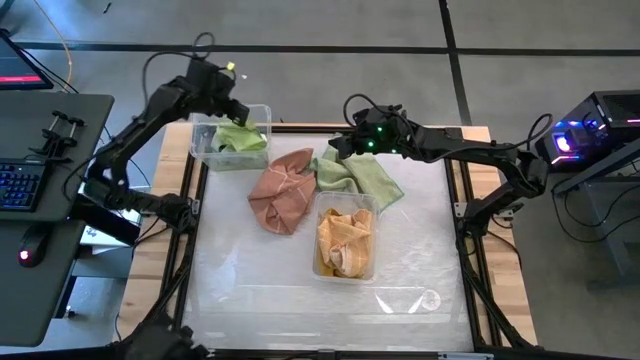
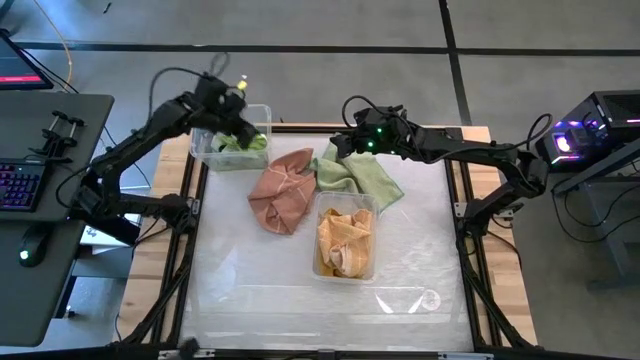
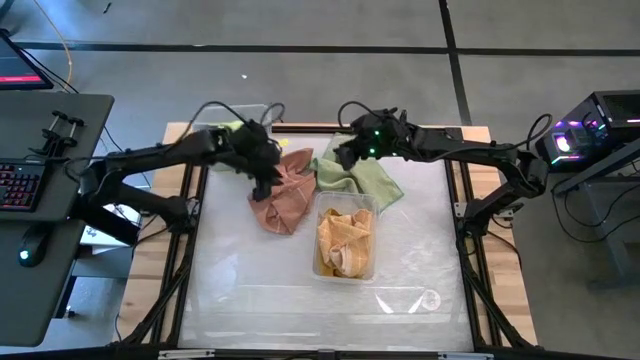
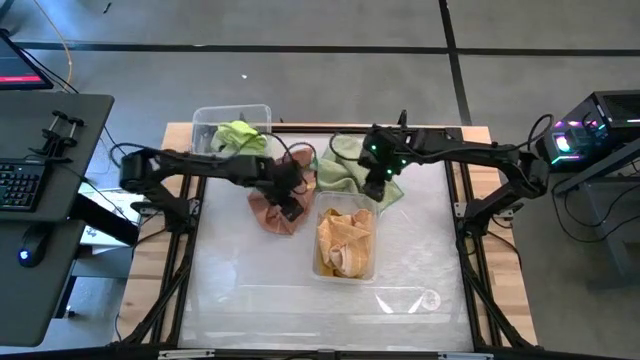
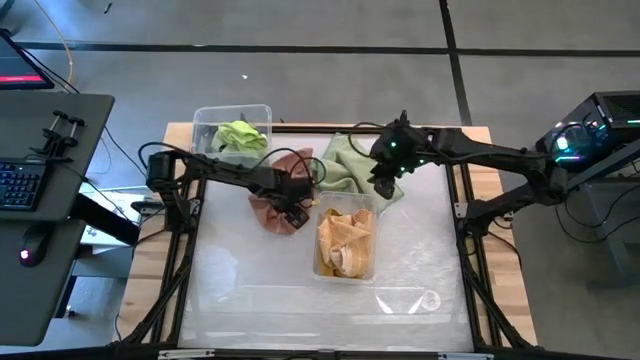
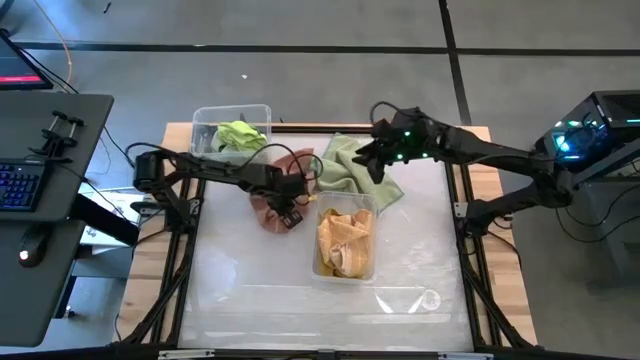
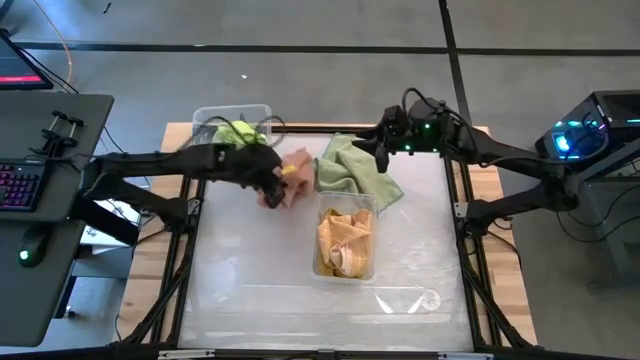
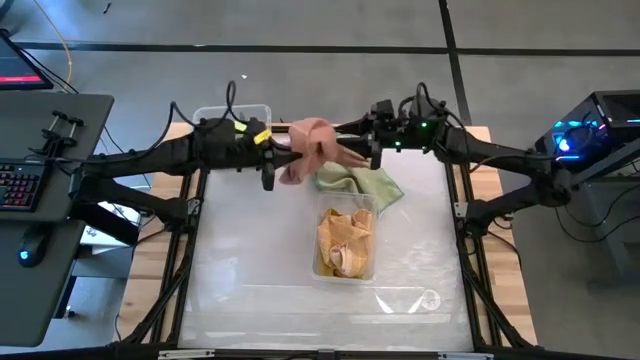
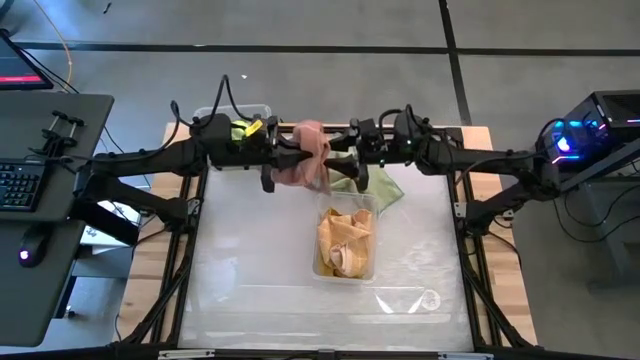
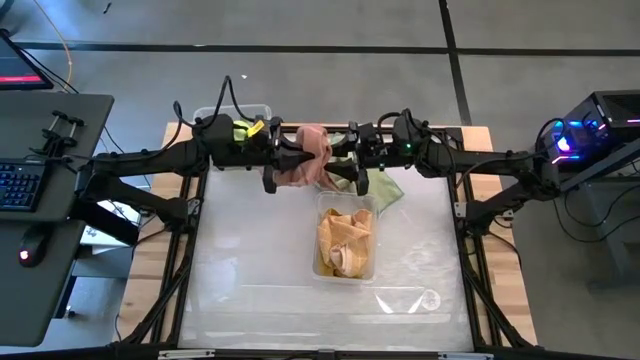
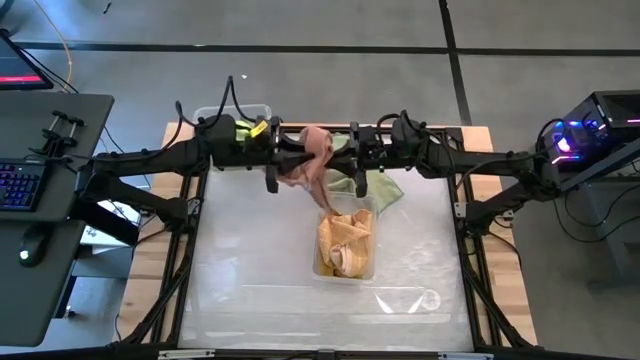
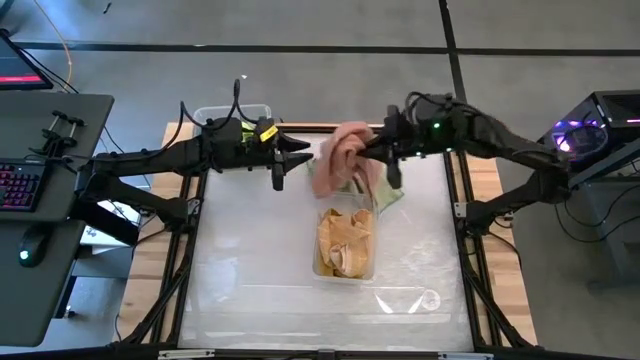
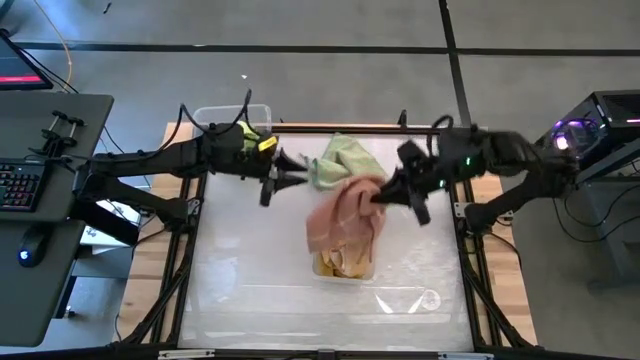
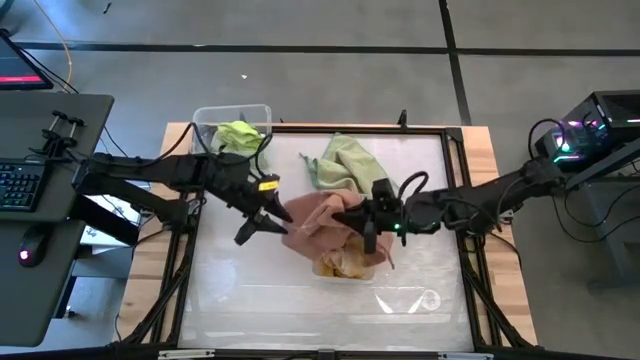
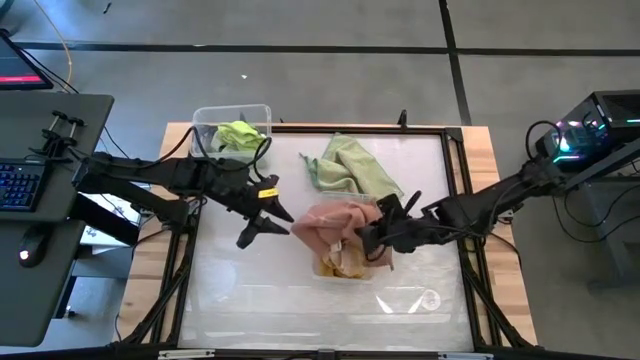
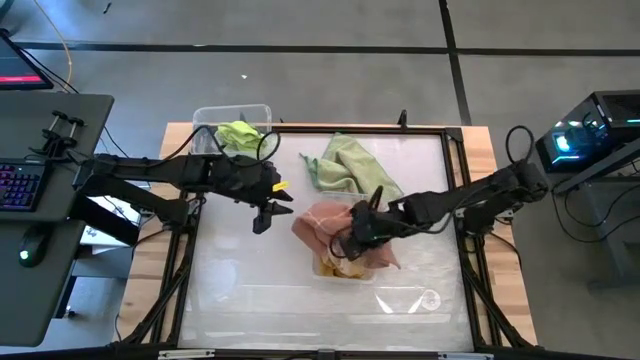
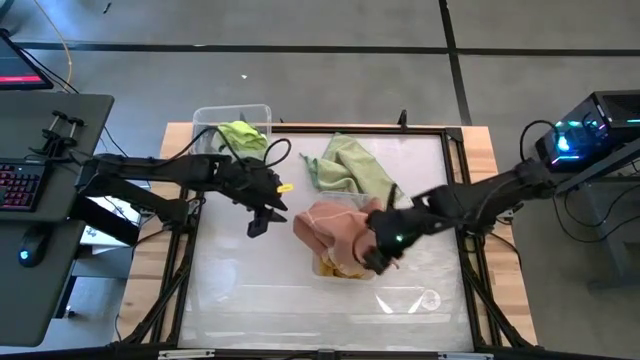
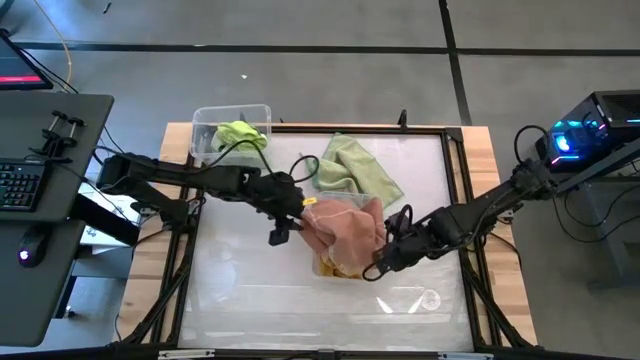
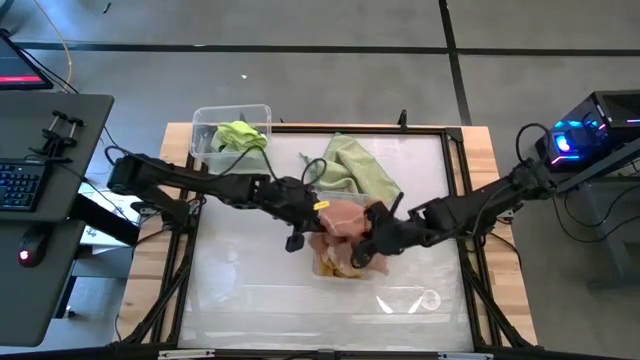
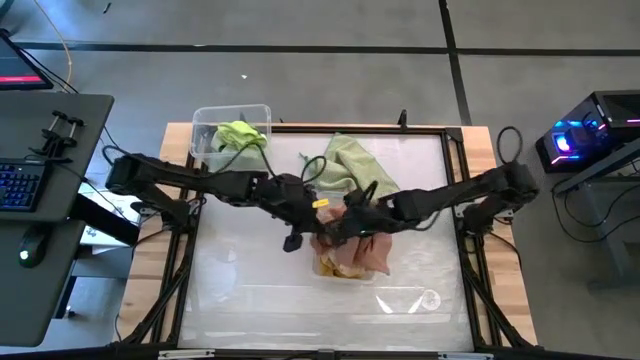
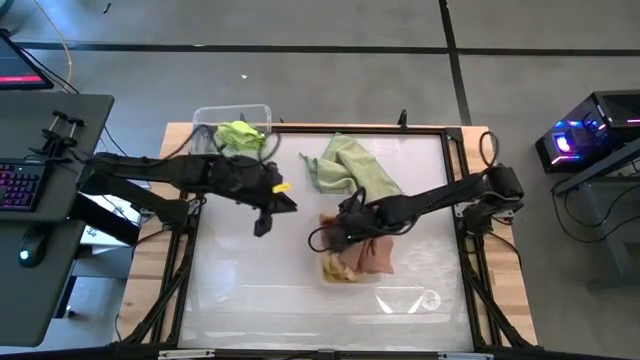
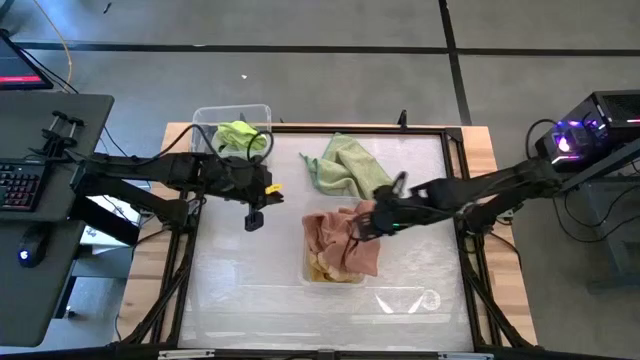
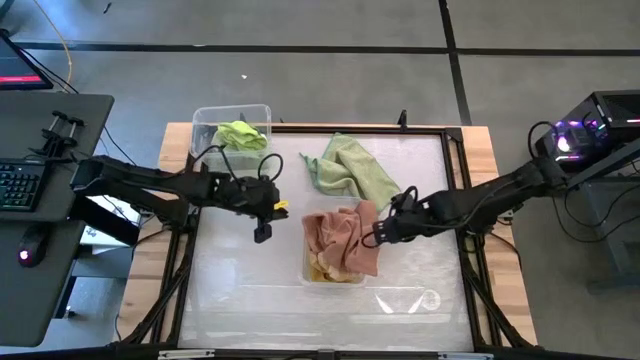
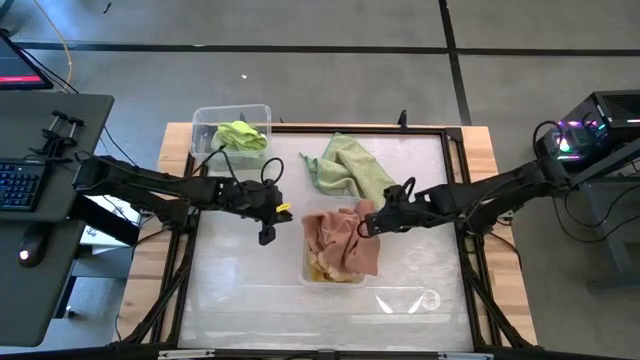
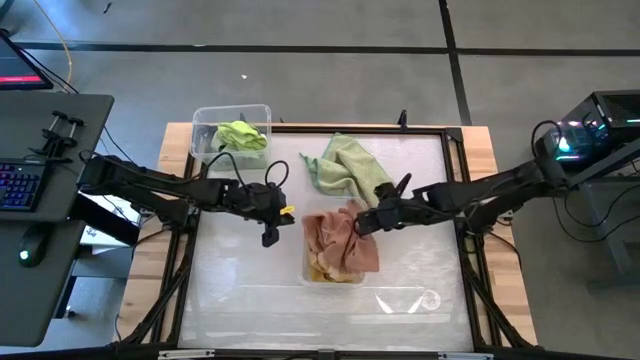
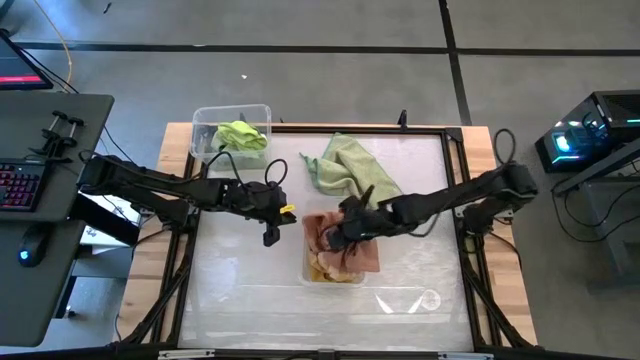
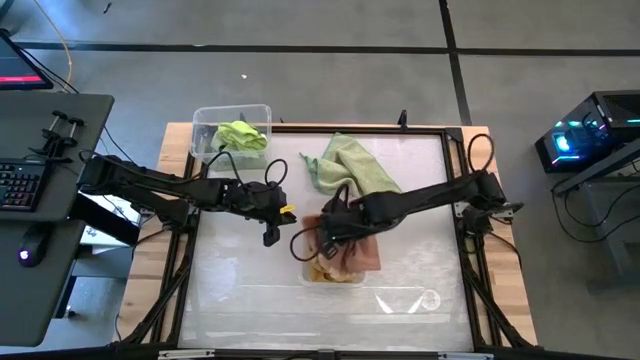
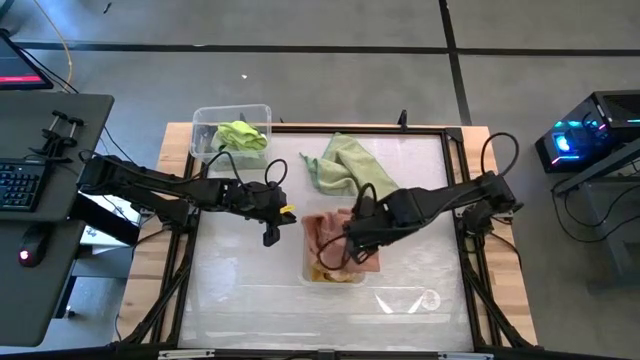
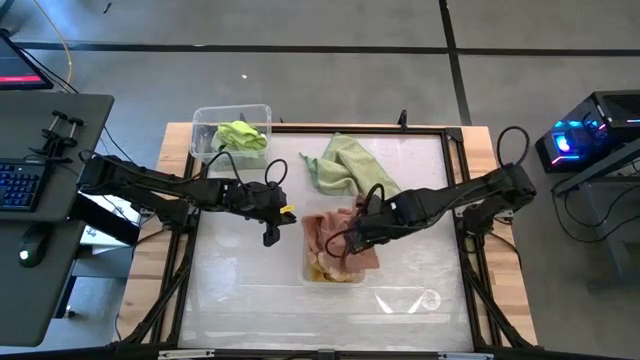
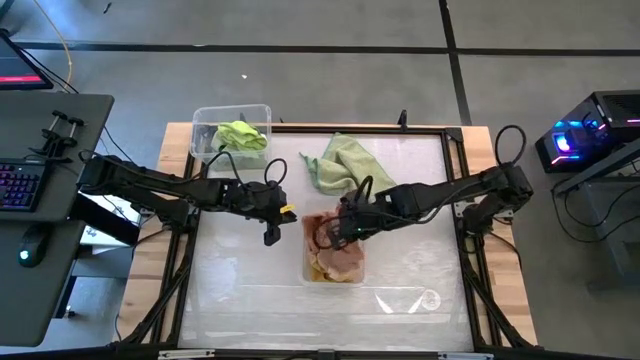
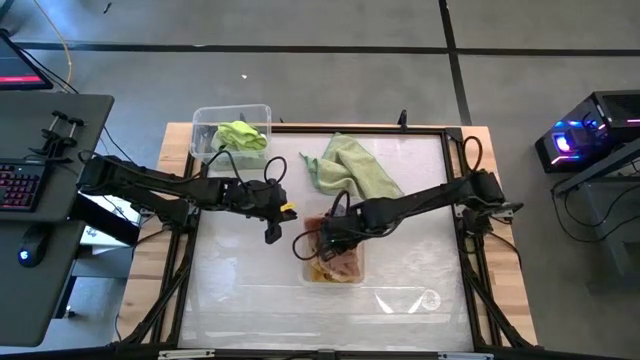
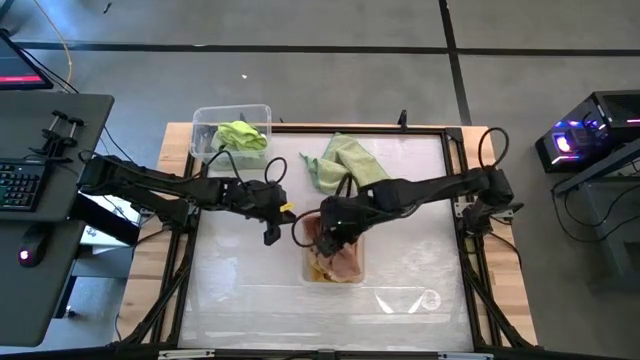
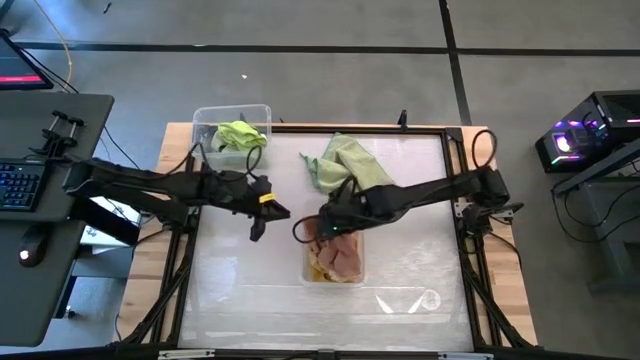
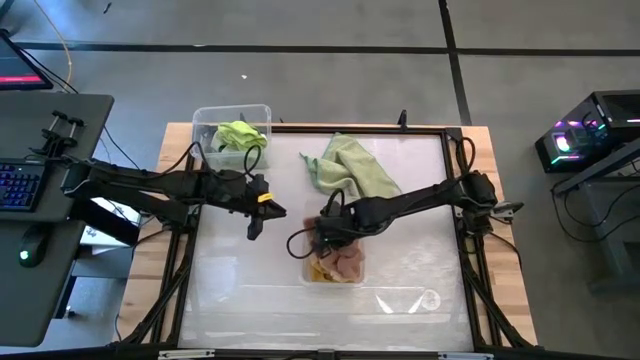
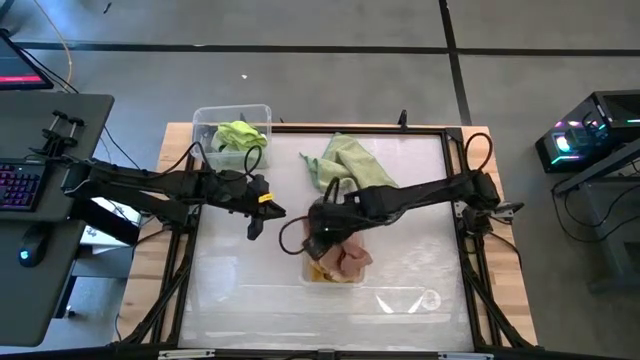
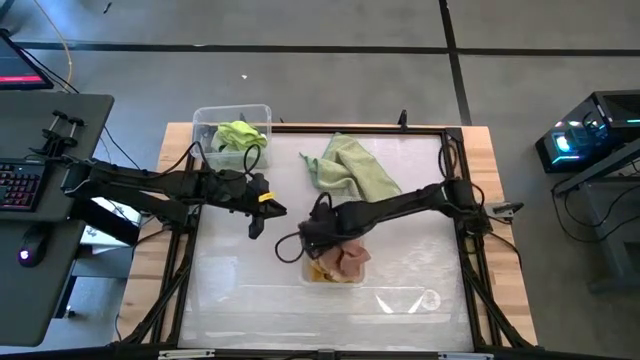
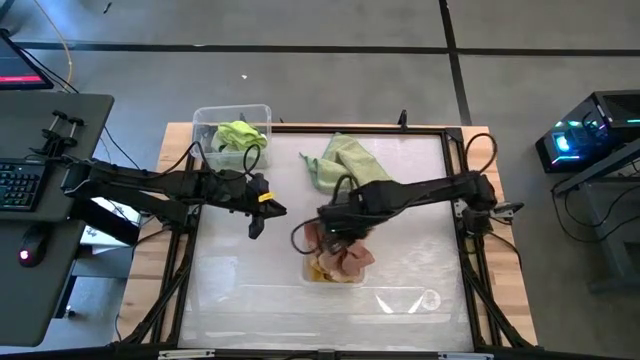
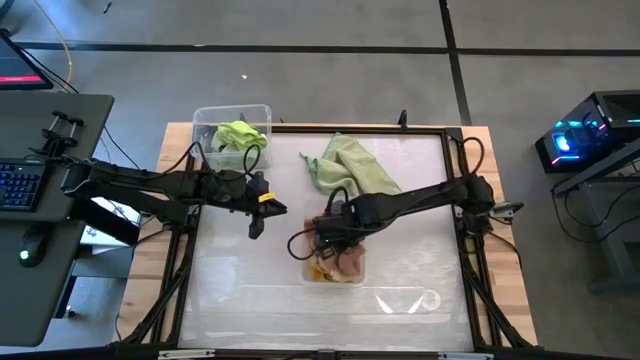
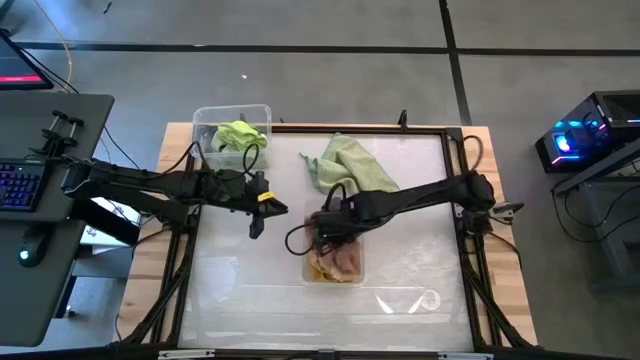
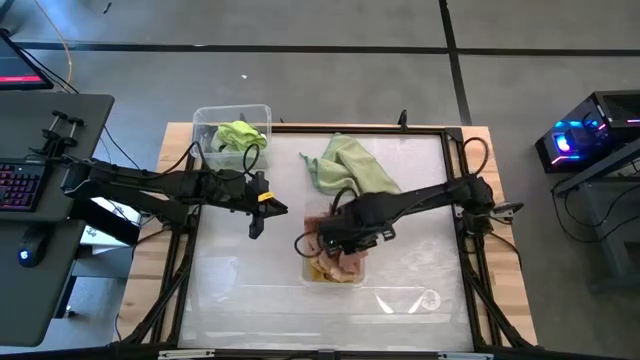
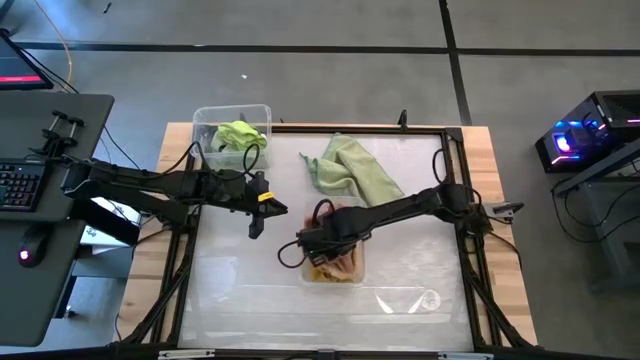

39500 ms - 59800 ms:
Task: Sort towels by color in basket
Put the orange towel into the bottom transparent bin
